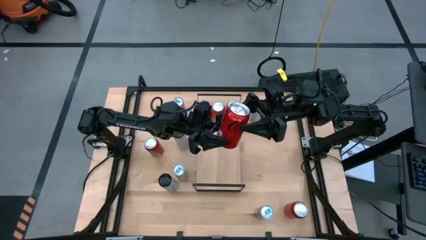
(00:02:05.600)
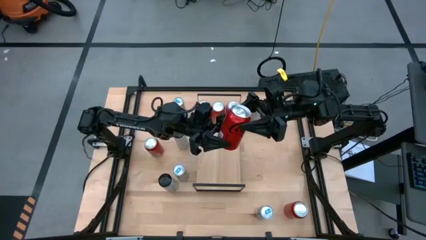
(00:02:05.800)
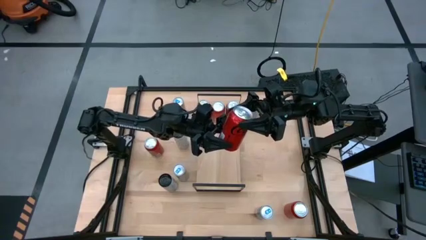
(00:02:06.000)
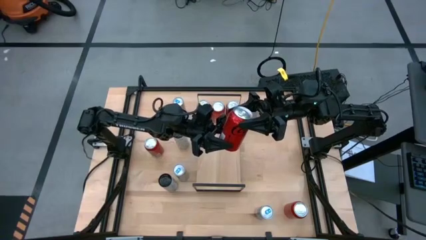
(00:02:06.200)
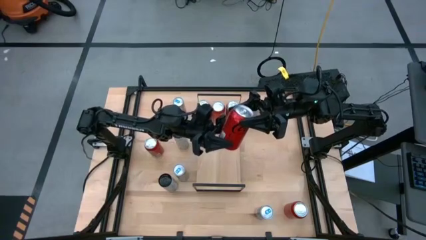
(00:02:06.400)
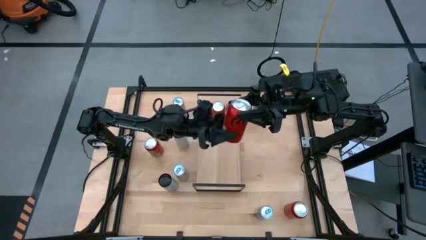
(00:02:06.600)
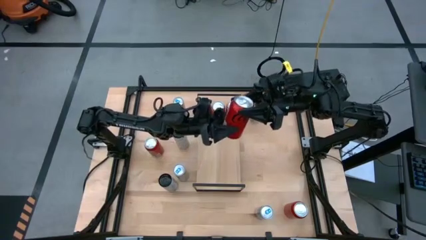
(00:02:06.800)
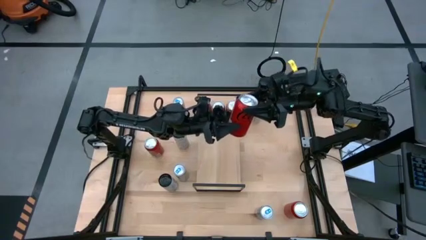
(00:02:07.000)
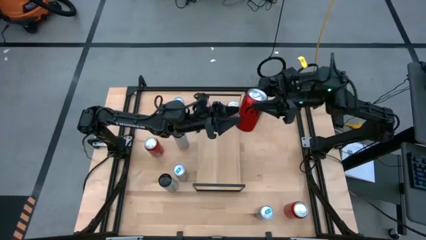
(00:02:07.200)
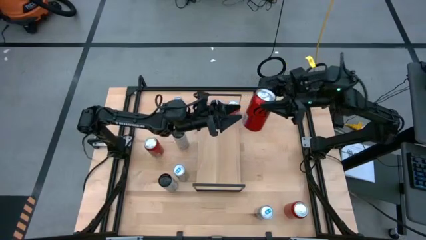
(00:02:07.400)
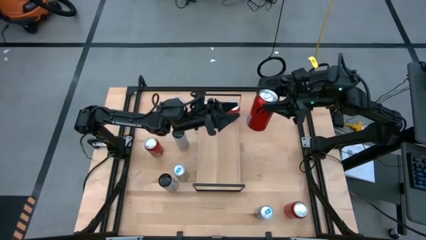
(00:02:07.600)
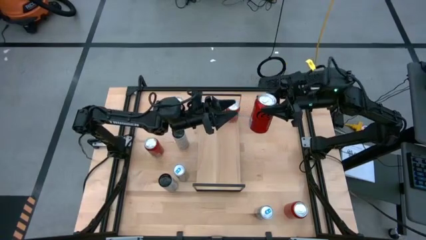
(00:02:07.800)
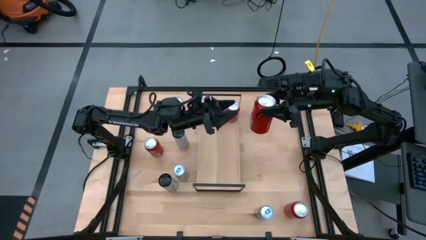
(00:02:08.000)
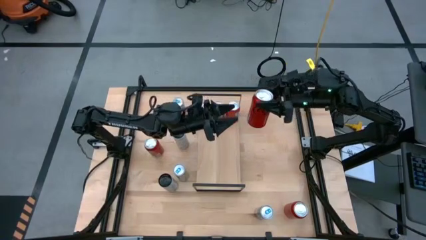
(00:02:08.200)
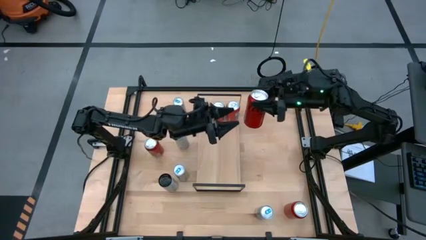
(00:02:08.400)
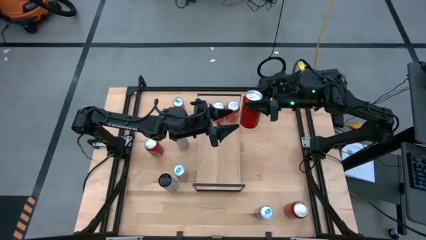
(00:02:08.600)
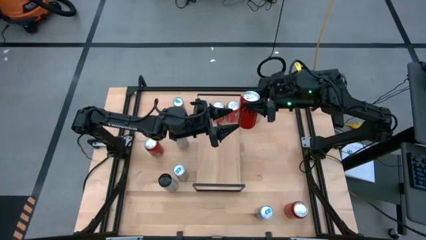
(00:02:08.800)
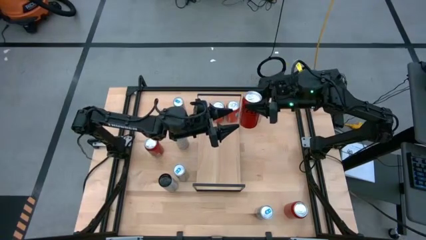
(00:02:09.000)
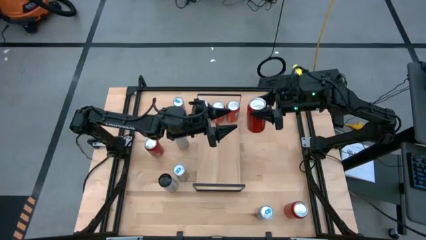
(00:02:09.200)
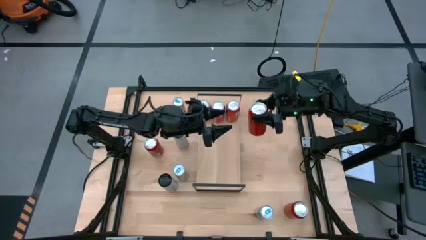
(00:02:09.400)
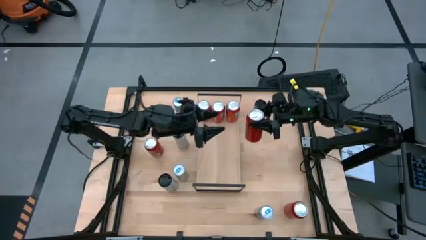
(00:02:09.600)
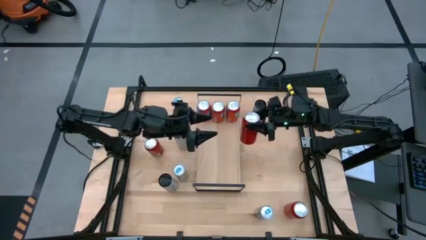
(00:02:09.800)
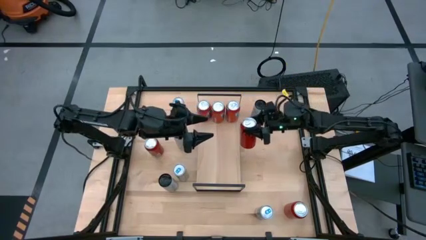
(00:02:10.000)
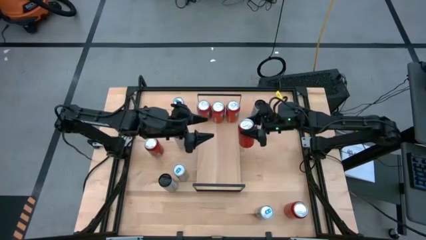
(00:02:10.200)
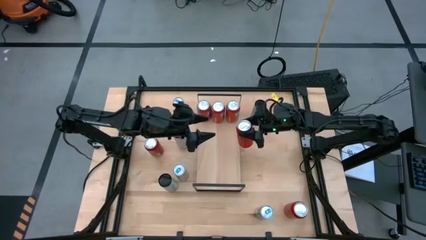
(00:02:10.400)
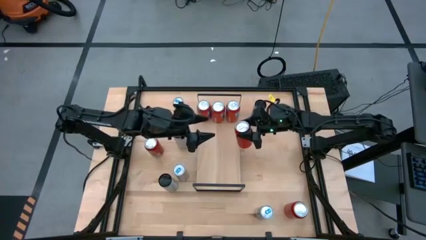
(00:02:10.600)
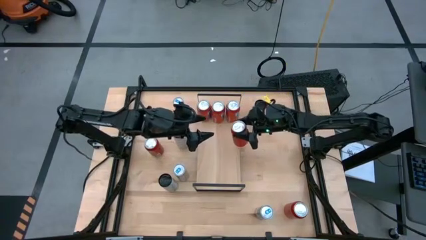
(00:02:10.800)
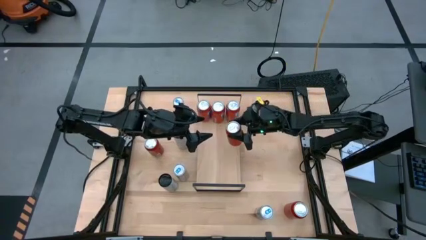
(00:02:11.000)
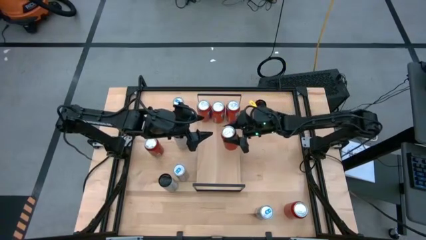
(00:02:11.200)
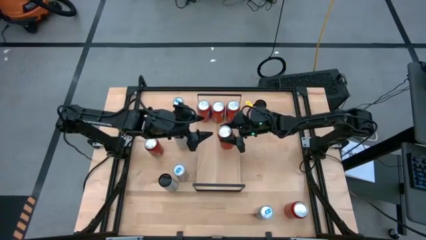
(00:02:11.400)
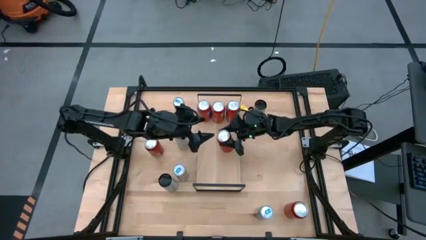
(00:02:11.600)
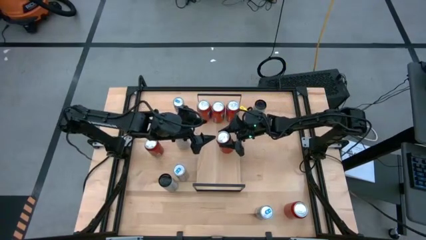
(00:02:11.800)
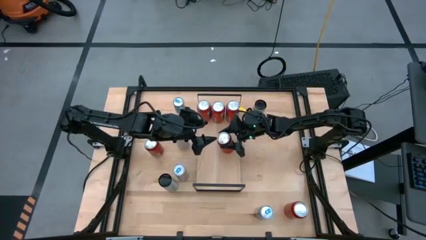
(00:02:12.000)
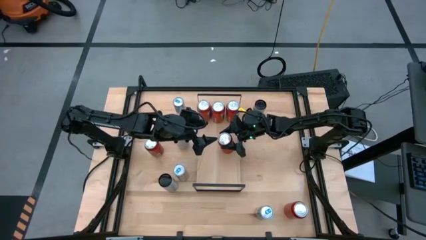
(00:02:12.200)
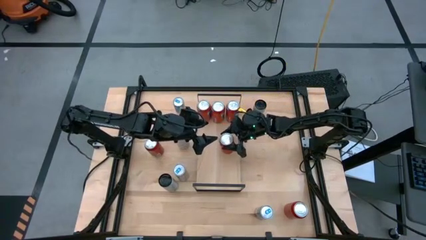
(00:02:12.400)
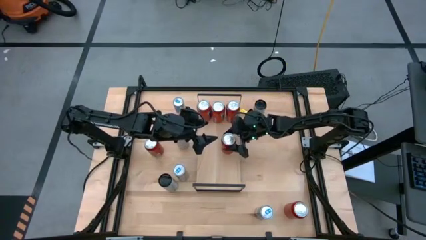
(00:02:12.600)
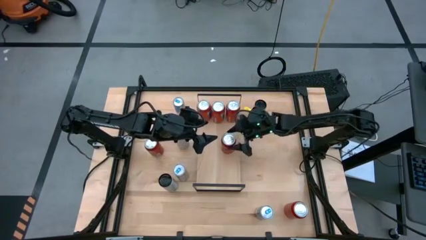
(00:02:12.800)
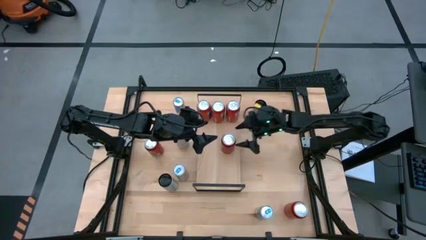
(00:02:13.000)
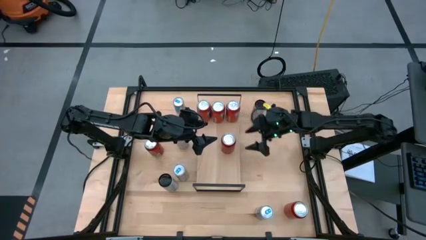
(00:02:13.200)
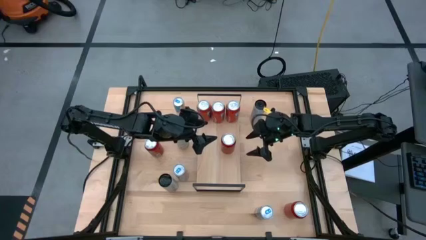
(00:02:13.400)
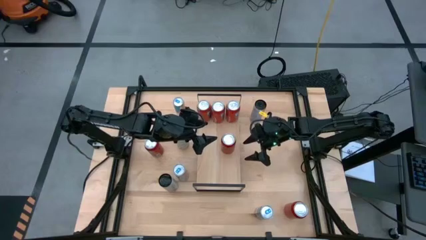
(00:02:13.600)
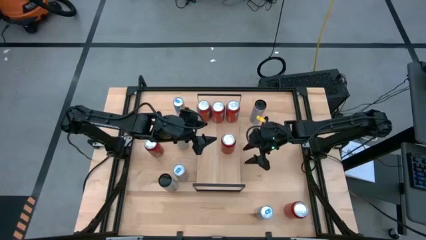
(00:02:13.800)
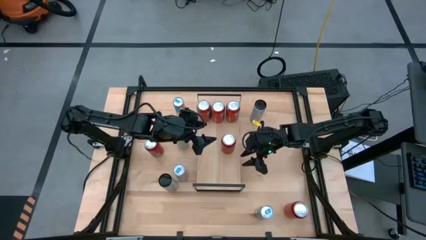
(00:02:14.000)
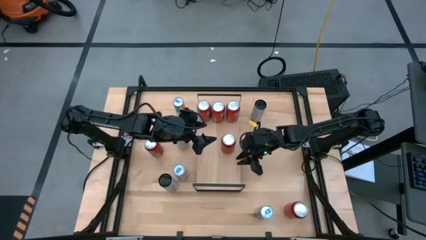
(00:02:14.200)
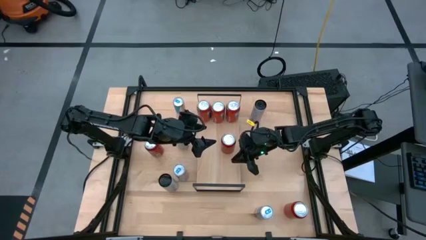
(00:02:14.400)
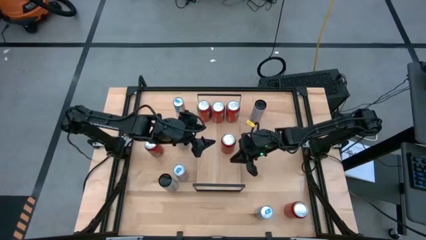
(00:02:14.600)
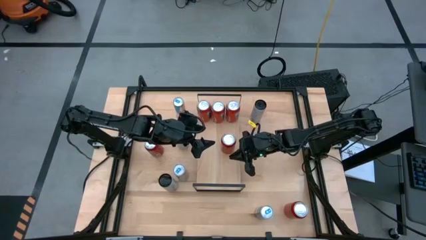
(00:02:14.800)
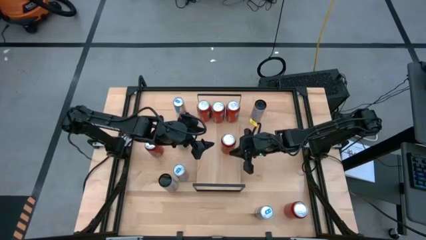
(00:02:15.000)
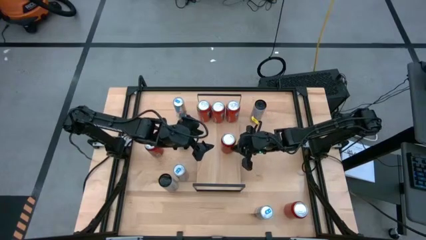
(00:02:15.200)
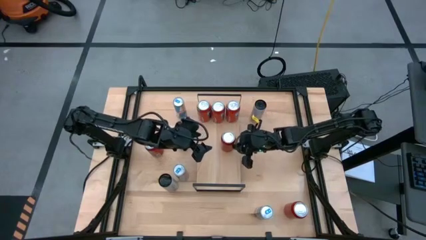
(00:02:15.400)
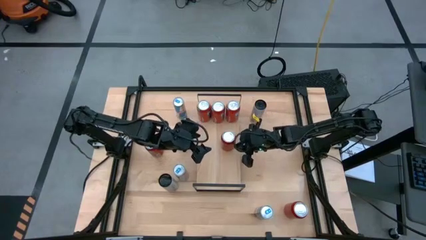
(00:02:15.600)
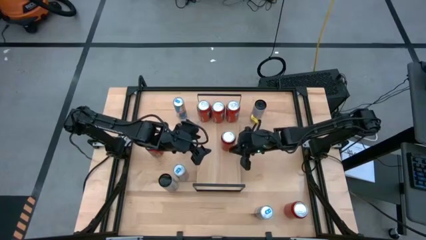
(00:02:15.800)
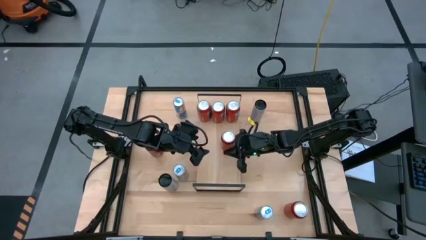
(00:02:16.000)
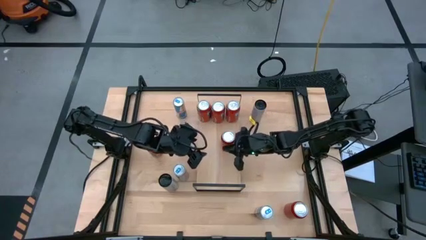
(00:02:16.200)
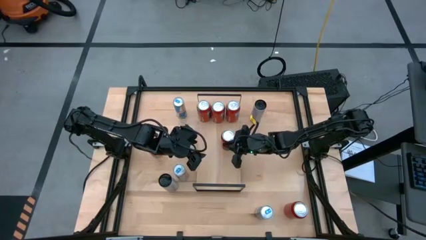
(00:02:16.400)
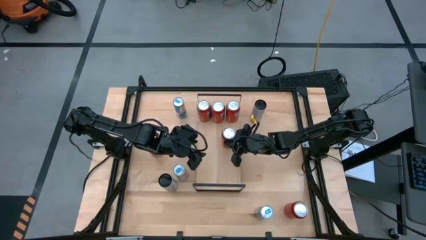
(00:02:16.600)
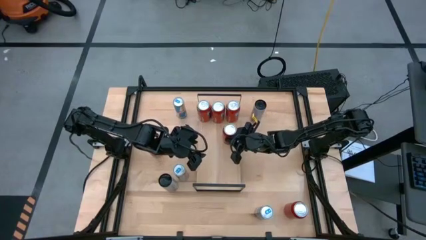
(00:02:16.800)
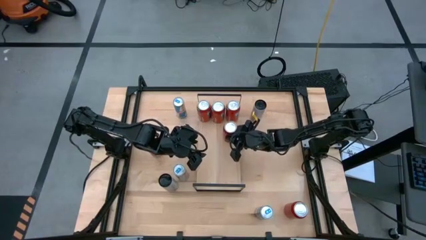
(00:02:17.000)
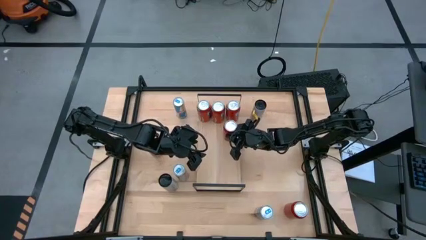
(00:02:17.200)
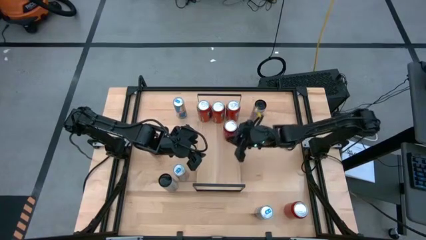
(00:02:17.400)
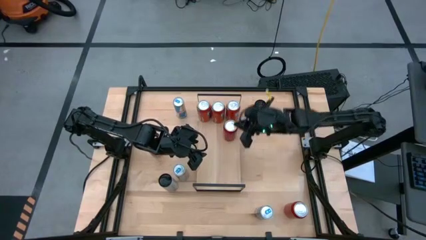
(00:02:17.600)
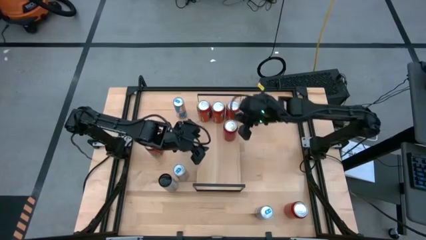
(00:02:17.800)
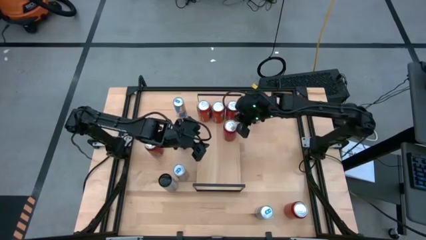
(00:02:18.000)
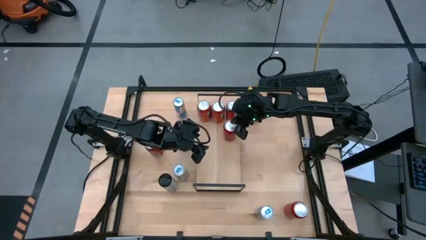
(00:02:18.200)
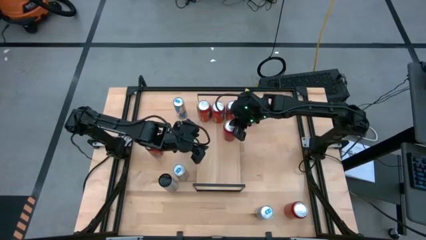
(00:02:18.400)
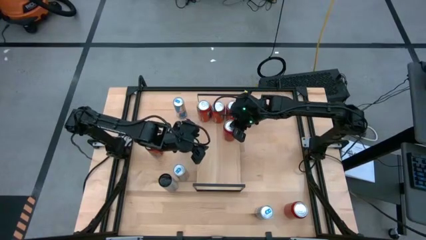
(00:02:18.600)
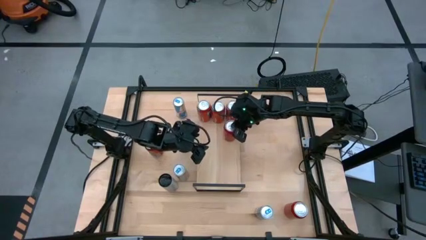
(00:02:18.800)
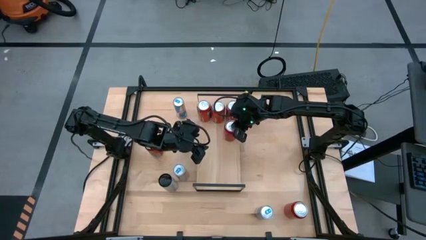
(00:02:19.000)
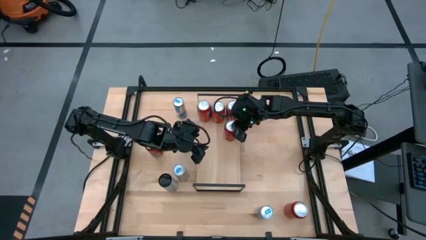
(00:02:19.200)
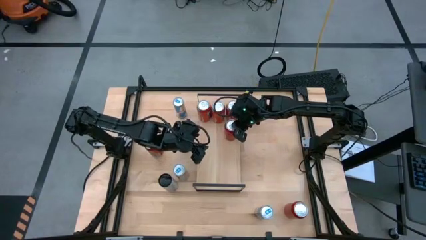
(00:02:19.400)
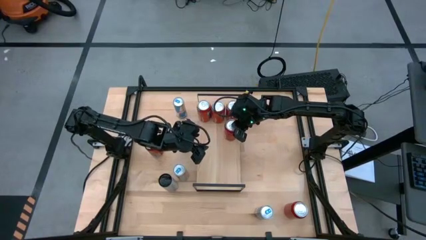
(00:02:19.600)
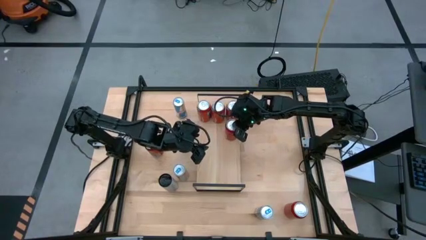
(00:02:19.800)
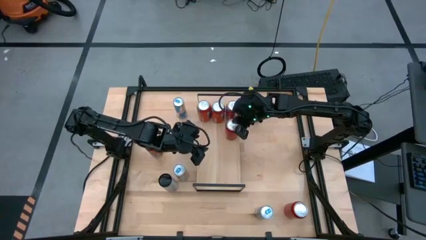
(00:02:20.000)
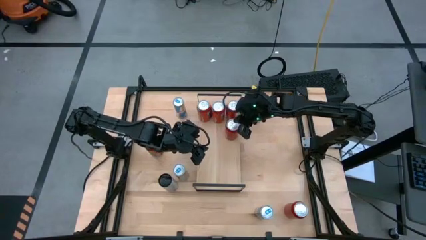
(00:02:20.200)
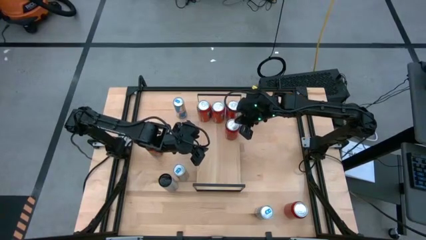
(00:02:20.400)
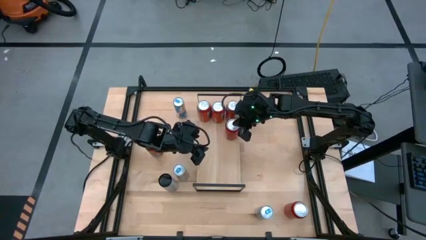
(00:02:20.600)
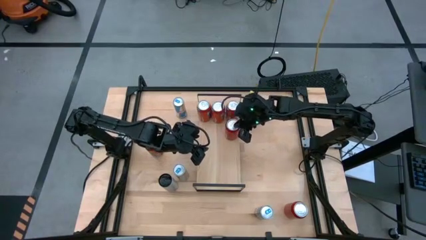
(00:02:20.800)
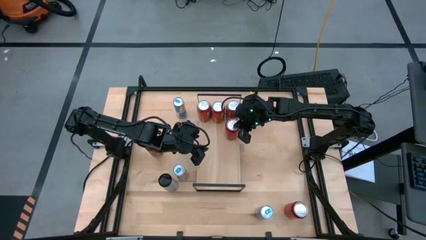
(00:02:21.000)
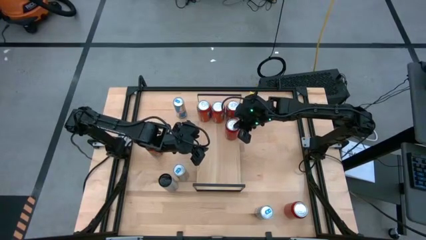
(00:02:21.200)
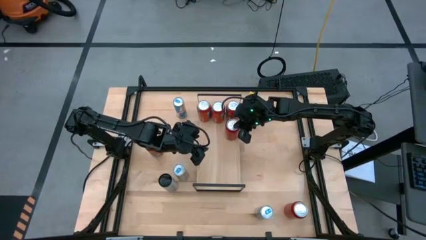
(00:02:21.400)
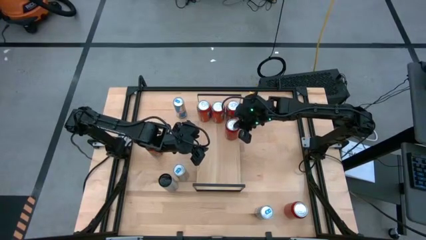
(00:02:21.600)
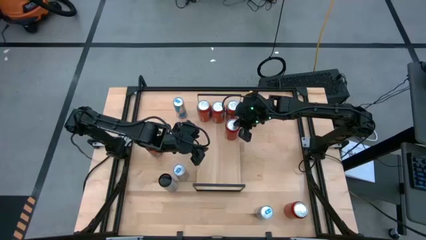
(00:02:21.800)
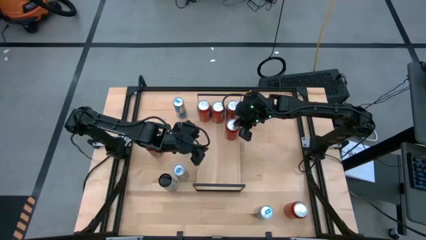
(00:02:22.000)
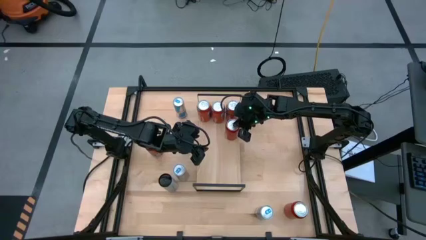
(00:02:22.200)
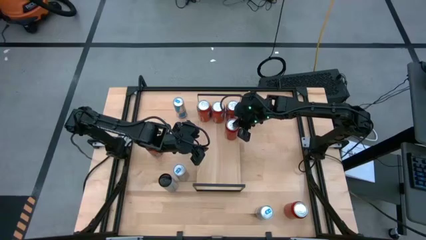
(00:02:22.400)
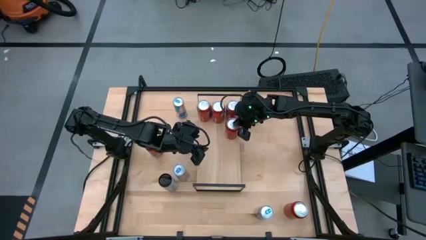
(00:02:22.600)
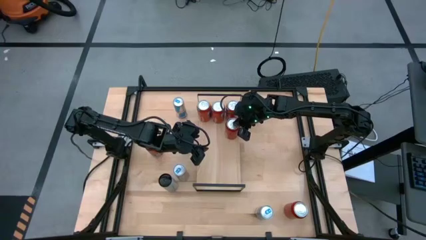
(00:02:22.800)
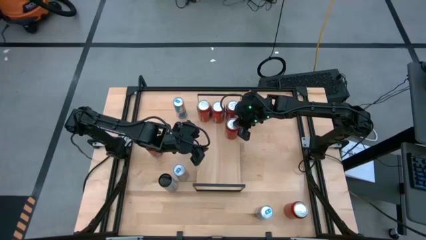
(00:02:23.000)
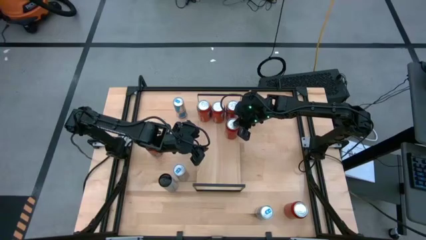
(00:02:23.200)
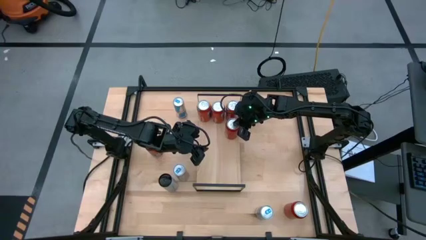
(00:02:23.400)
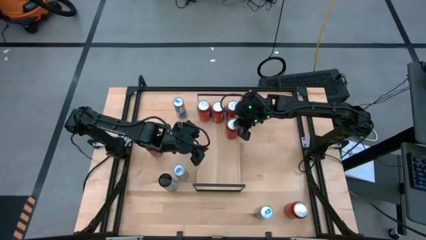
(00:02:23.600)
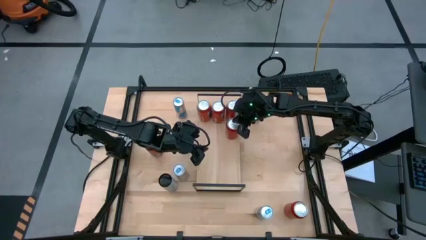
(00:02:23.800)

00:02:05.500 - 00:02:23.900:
Task: Place canned beverage on shelf
Put the top right red soda can on the shelf
